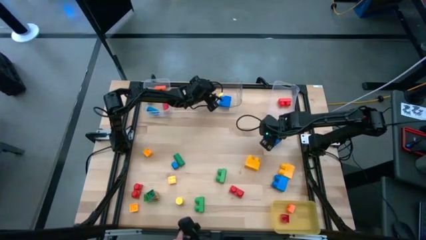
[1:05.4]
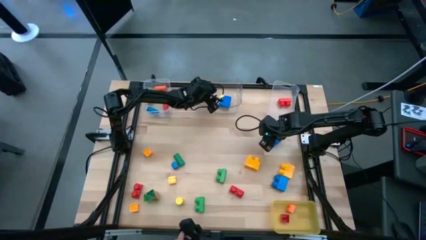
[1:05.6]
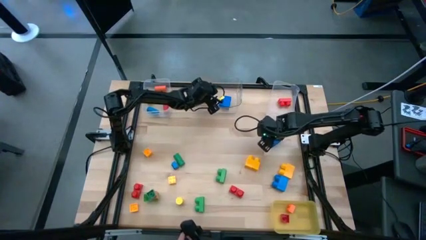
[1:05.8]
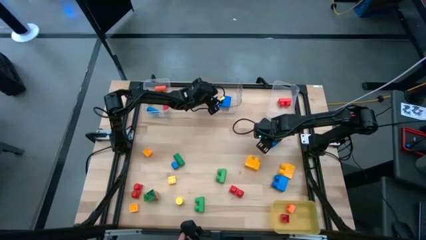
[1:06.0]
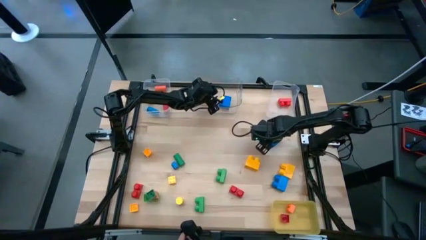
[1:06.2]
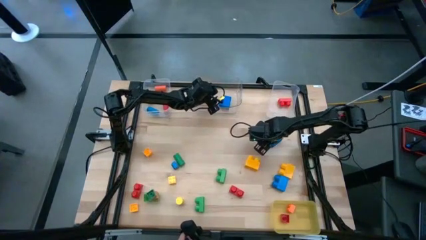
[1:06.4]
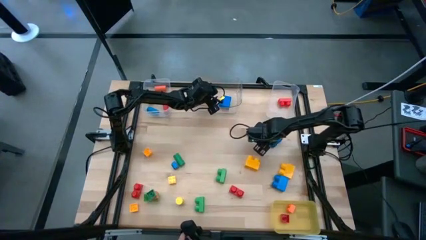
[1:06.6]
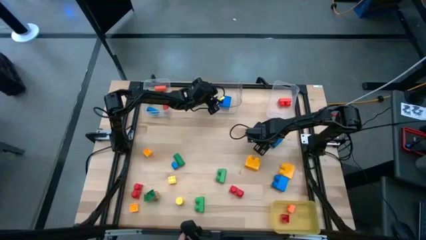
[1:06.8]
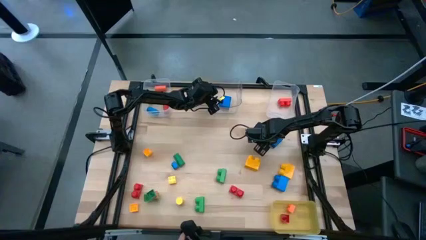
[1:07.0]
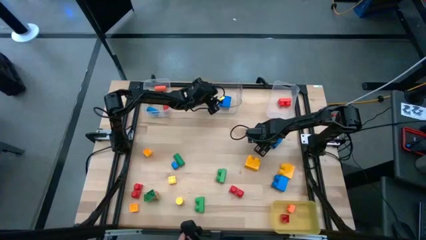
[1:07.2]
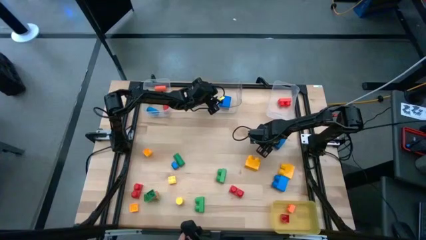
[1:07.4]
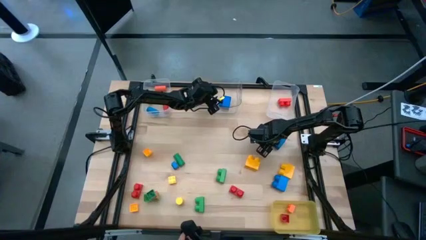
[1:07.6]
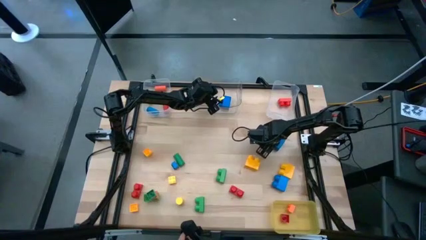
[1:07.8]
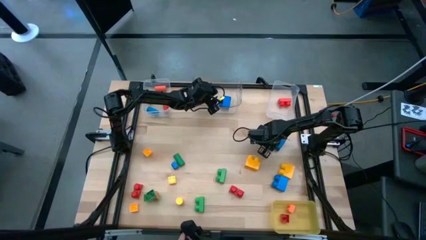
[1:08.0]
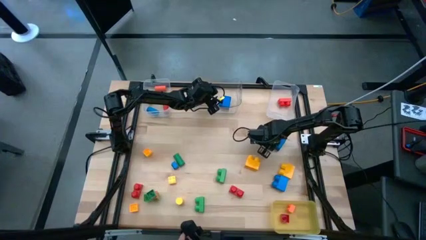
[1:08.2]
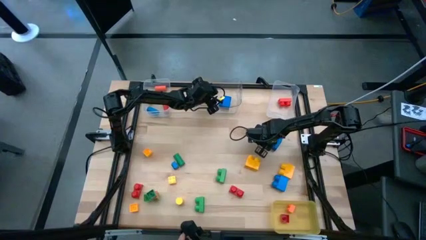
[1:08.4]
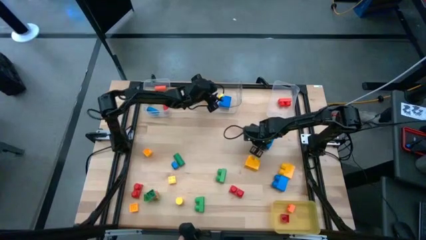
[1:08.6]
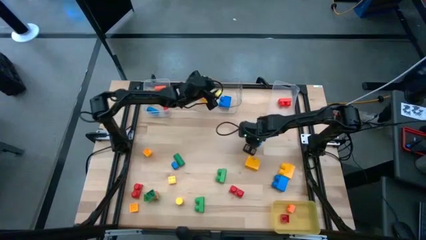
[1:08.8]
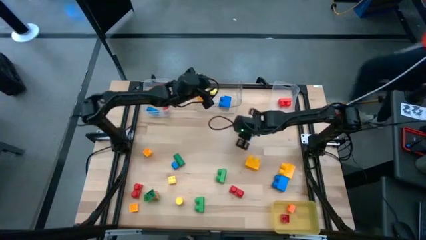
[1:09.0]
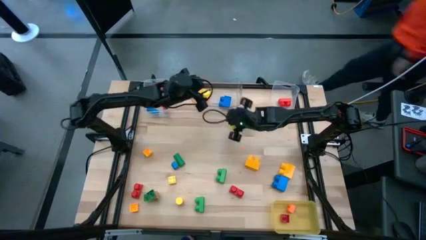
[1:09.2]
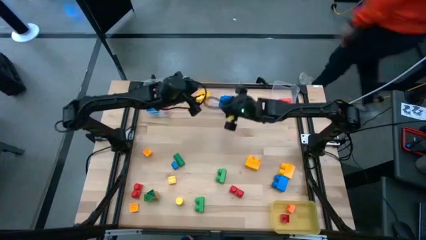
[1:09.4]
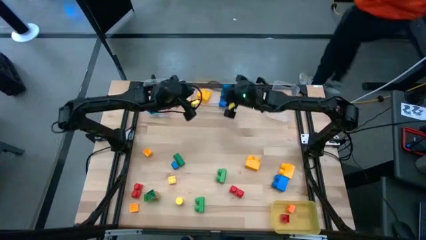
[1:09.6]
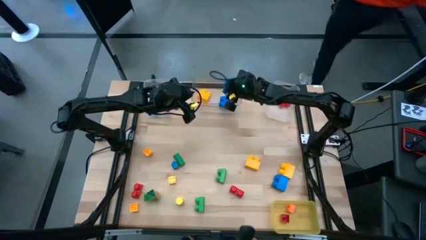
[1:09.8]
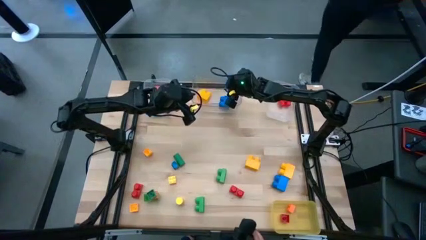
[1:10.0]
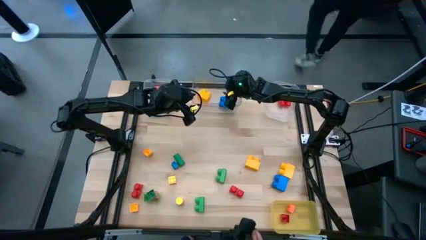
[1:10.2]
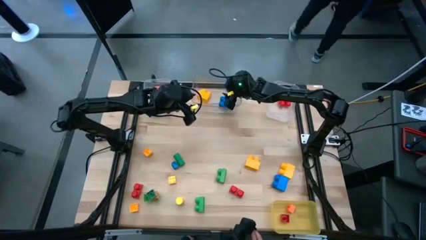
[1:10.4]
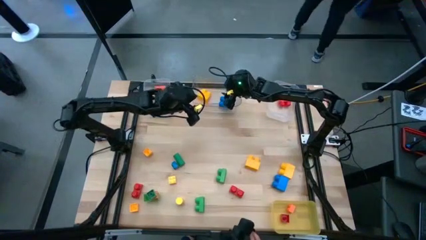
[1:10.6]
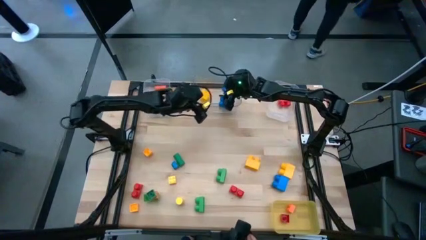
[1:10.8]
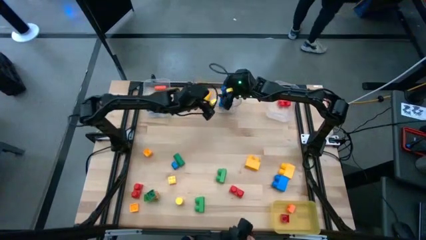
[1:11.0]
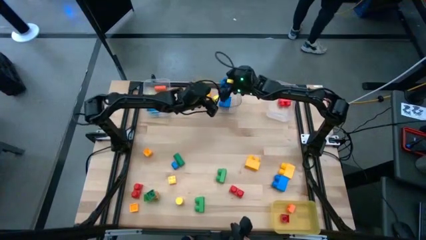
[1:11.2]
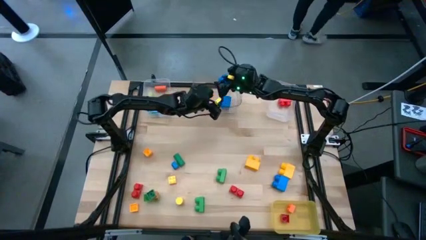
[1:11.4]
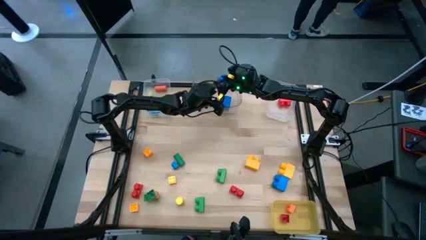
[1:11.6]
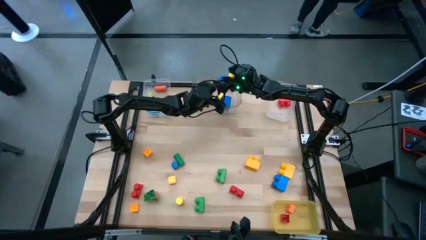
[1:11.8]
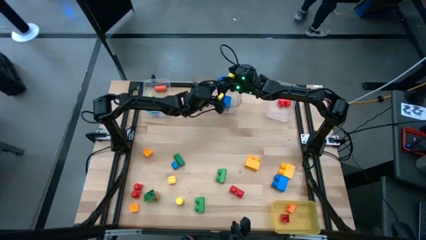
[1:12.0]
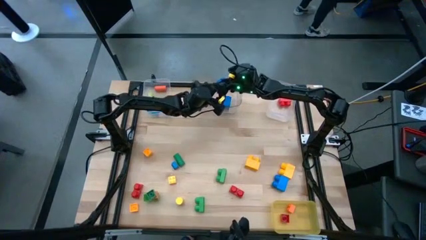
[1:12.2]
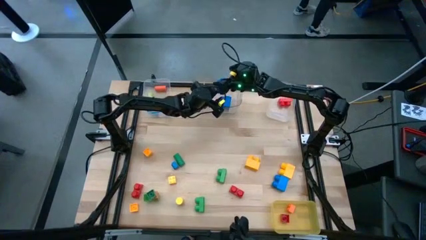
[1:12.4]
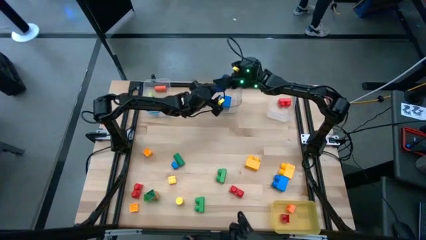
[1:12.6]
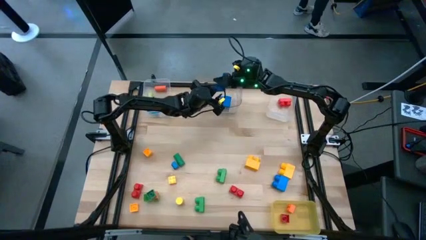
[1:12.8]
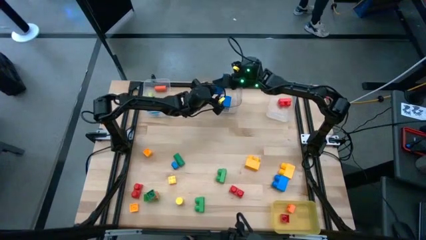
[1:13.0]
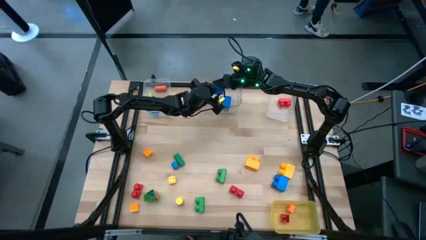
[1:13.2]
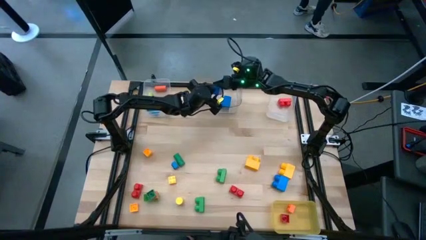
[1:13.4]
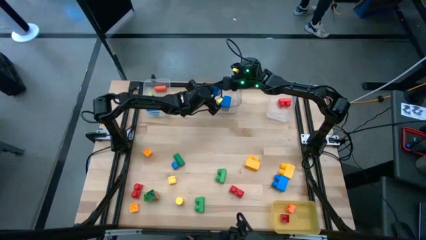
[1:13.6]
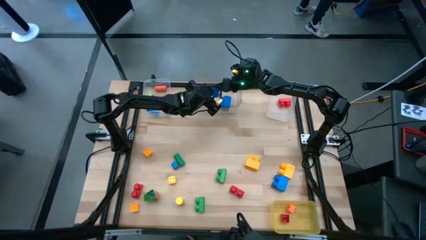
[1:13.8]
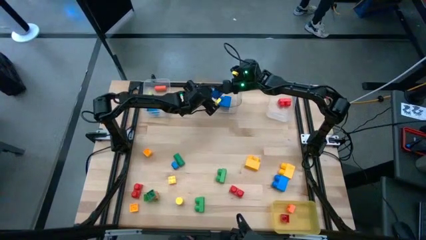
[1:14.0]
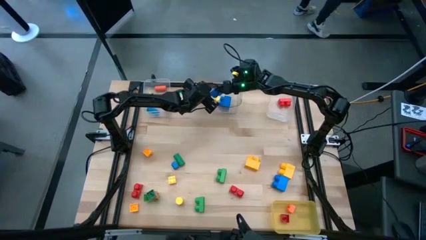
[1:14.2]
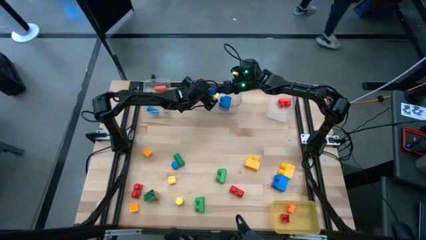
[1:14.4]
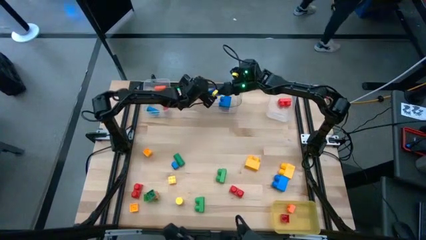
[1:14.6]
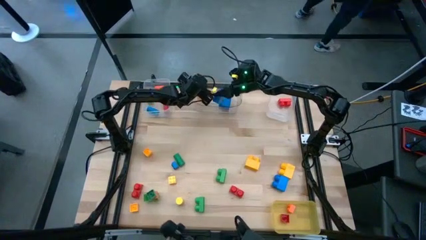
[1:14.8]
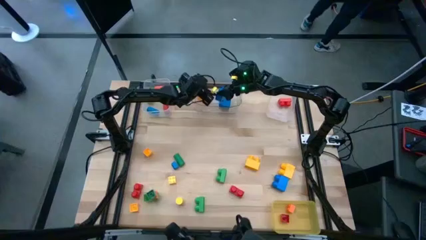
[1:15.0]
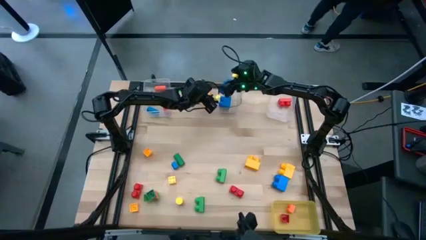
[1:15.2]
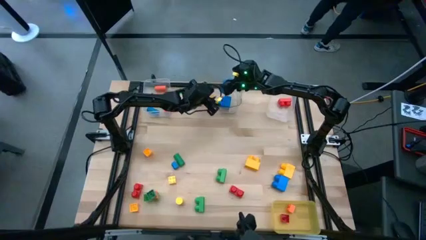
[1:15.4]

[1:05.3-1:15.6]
Task: Sort blocks by size
Put the large blue game piece in the middle transparent bin

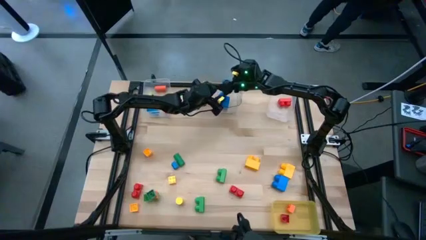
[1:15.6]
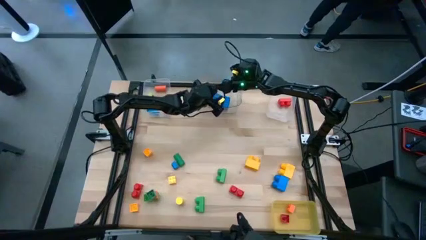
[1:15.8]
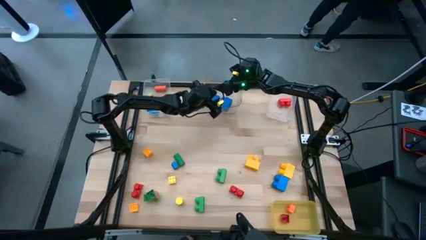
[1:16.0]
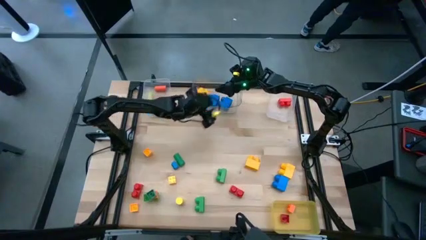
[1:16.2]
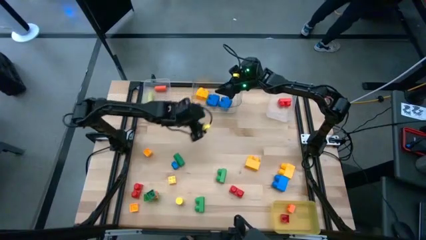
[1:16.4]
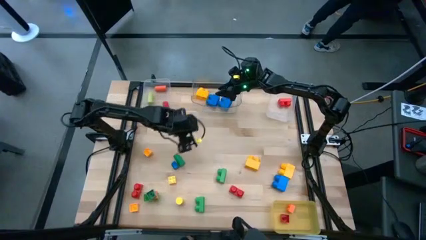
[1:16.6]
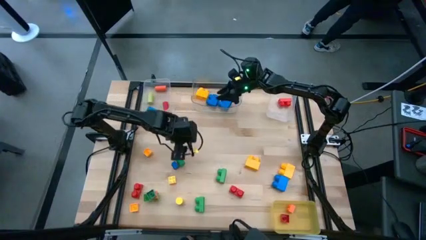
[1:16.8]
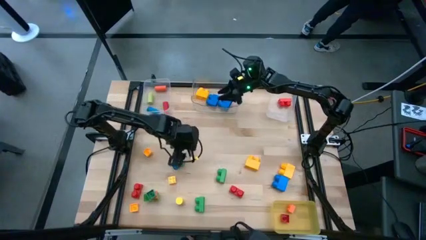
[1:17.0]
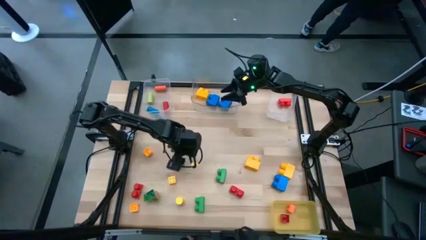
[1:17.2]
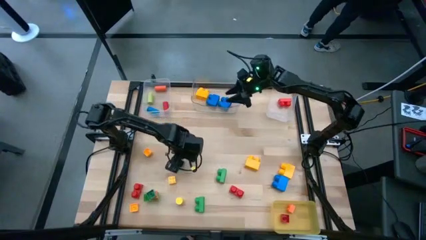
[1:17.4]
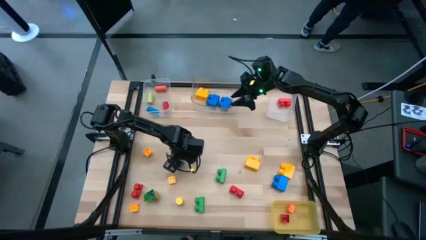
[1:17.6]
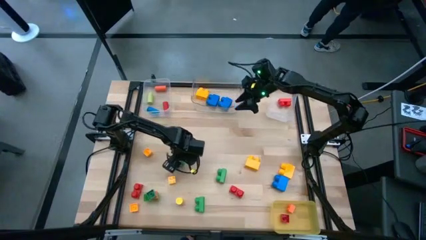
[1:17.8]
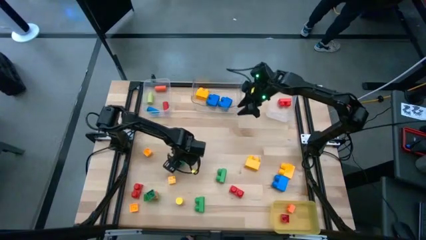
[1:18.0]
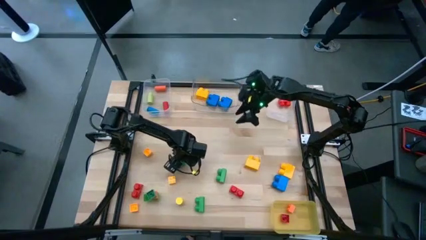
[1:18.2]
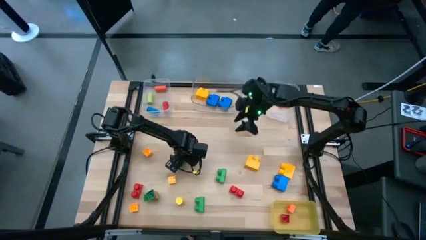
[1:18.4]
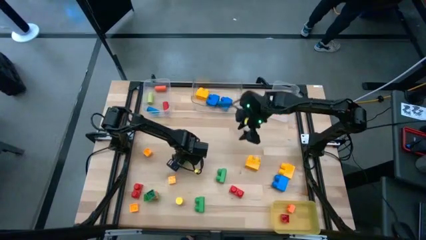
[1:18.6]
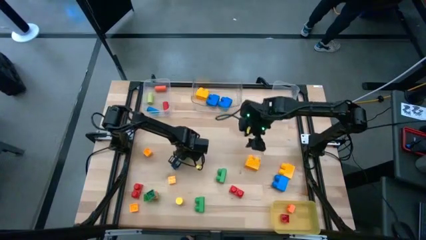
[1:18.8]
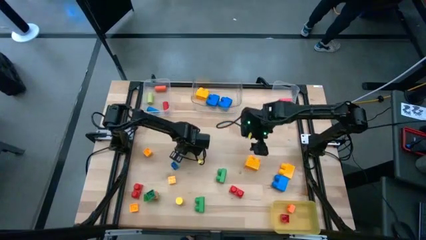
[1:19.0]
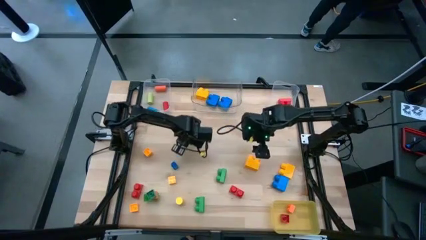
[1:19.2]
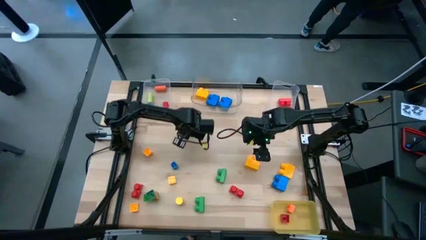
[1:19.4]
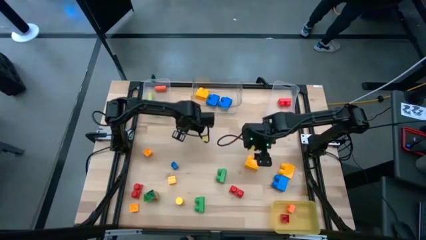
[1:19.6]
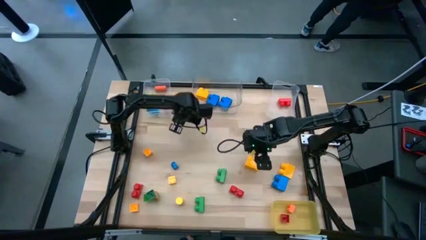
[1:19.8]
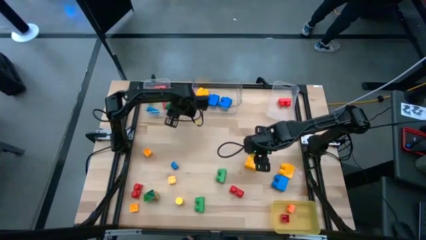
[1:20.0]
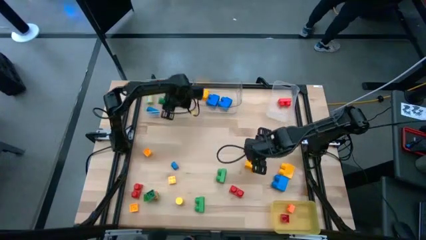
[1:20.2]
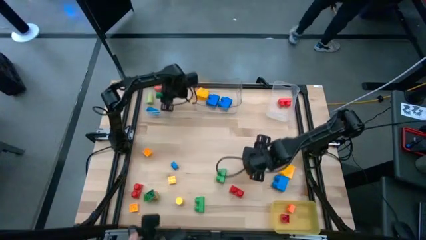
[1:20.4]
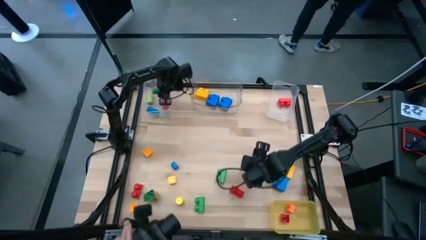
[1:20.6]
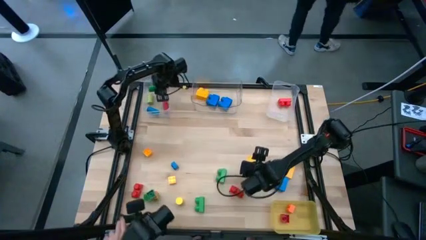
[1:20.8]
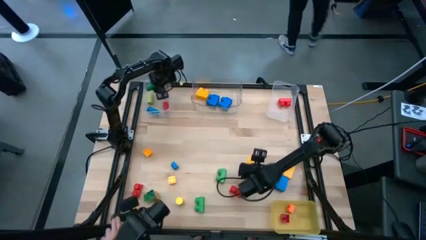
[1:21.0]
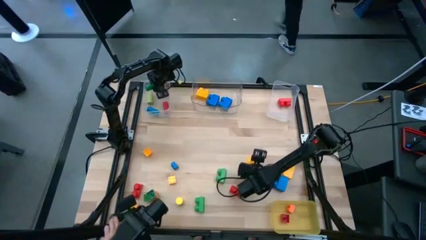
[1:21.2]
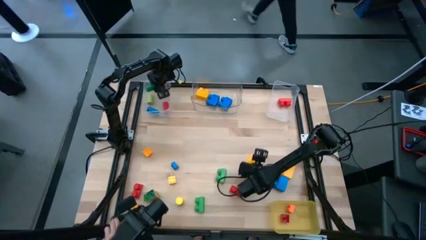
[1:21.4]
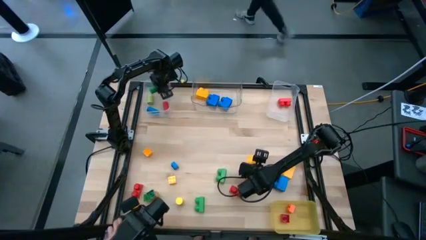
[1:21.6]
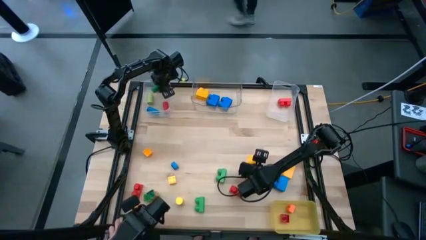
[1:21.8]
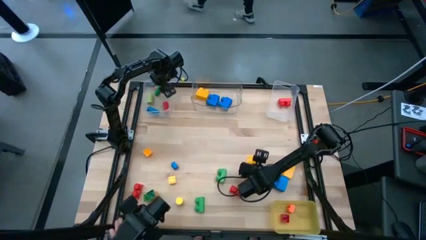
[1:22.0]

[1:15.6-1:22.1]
Put the green cylindrical wooden block into the left transparent bin
